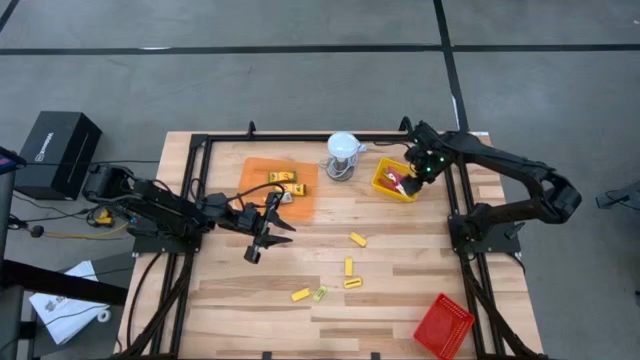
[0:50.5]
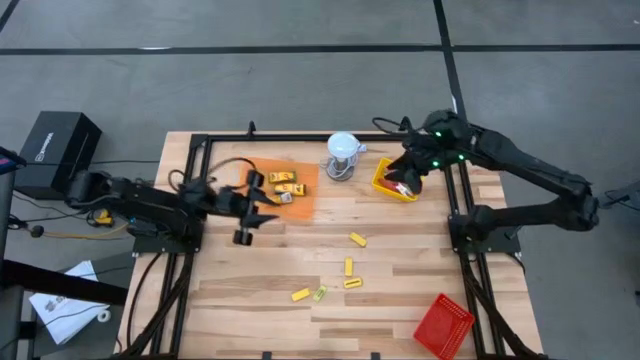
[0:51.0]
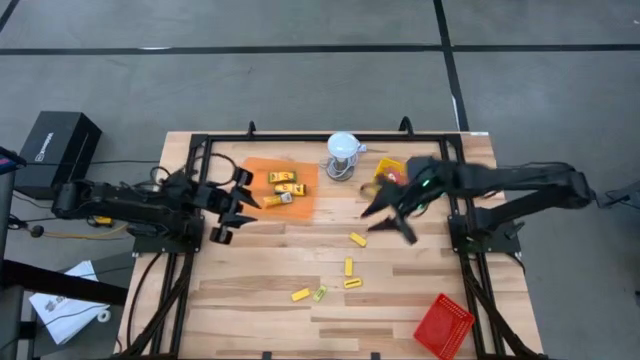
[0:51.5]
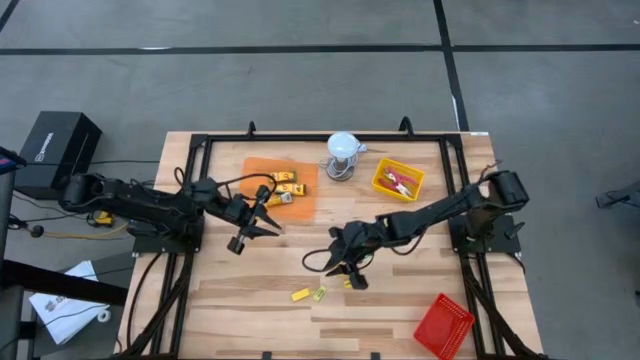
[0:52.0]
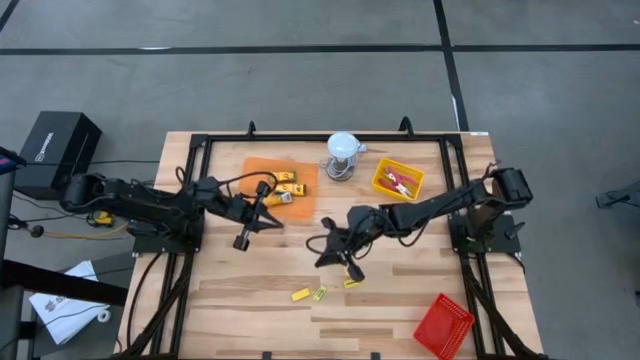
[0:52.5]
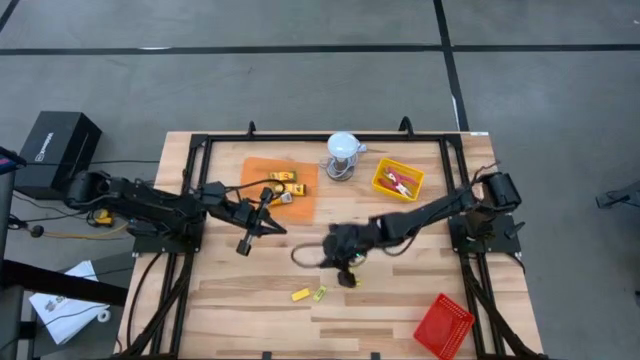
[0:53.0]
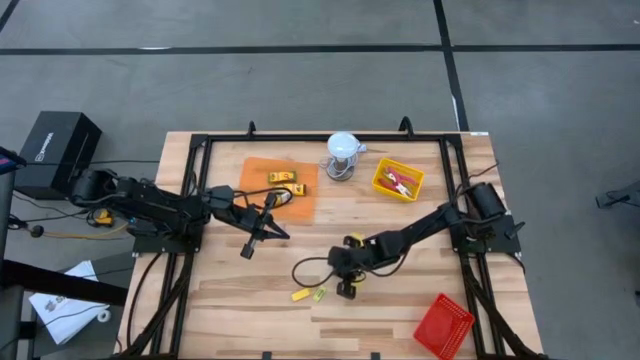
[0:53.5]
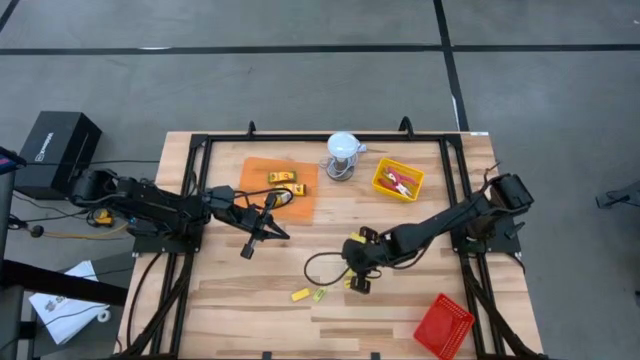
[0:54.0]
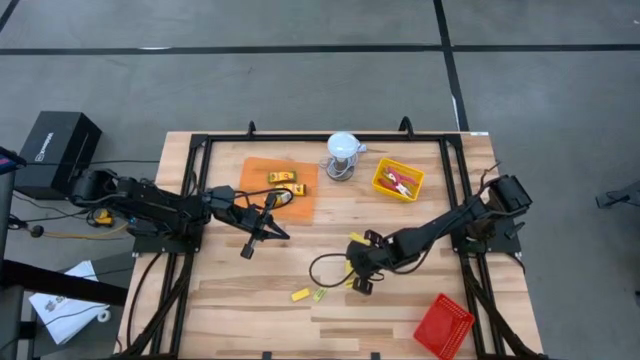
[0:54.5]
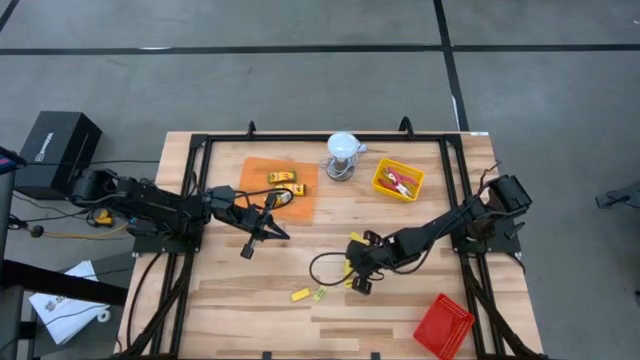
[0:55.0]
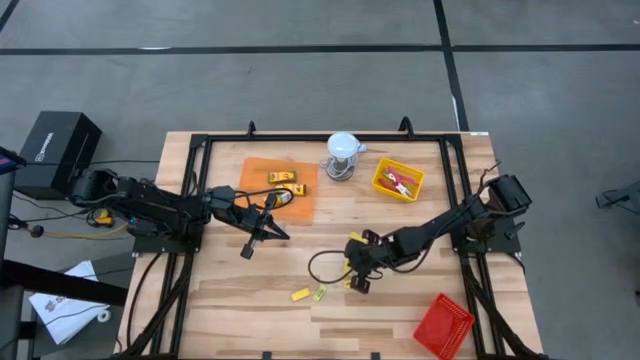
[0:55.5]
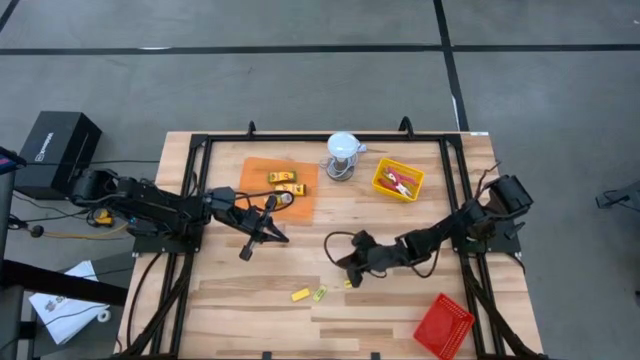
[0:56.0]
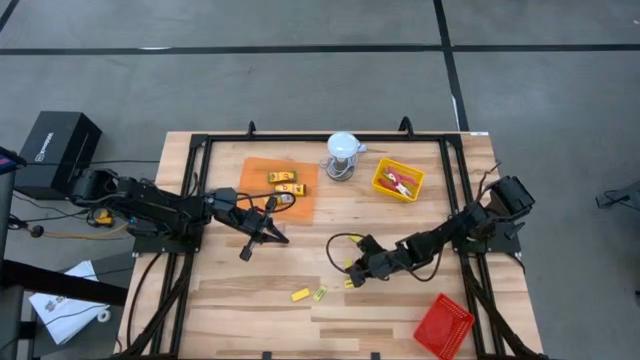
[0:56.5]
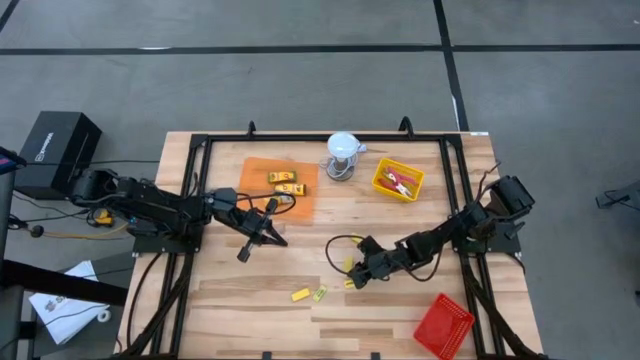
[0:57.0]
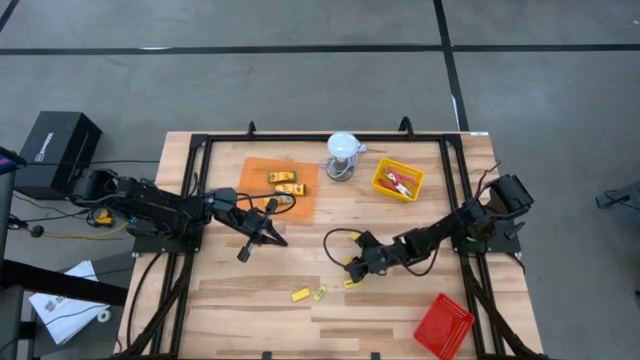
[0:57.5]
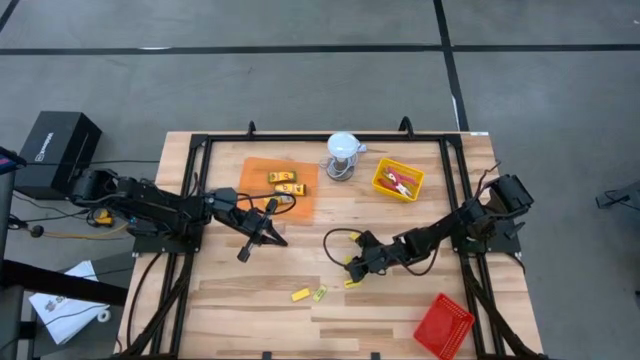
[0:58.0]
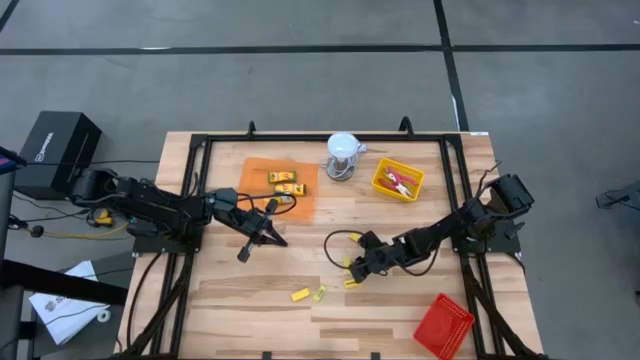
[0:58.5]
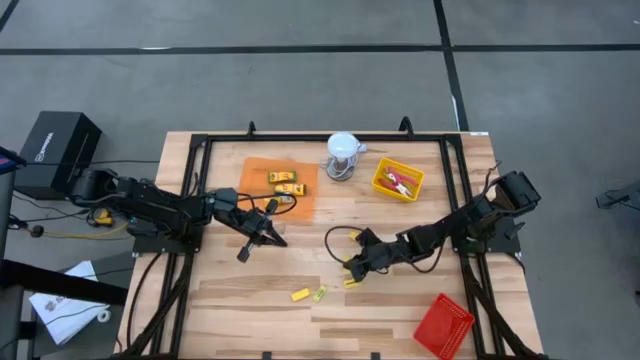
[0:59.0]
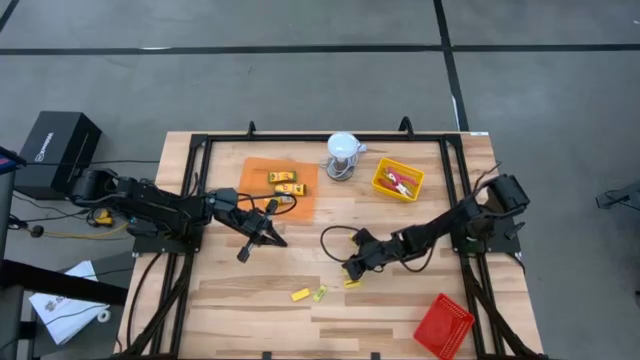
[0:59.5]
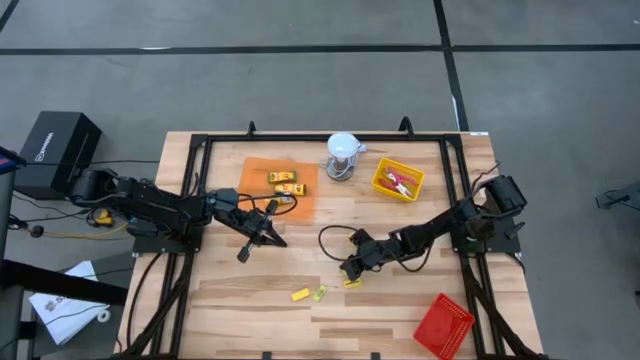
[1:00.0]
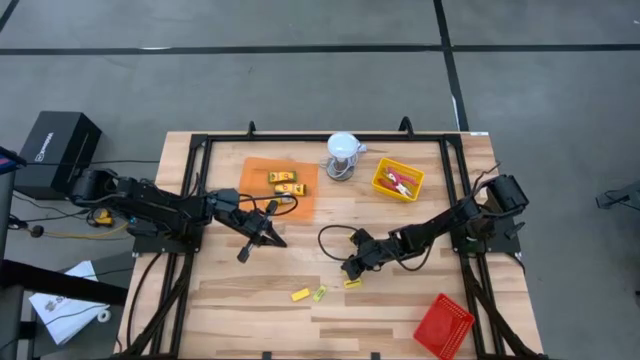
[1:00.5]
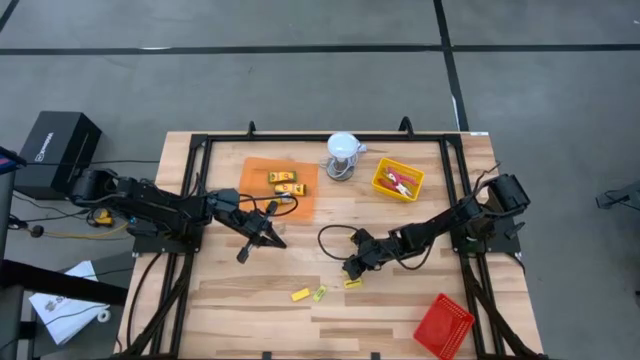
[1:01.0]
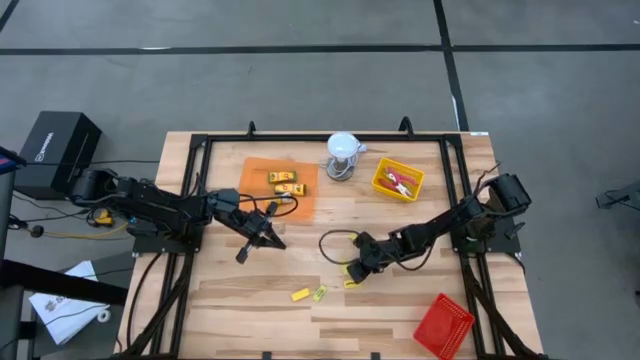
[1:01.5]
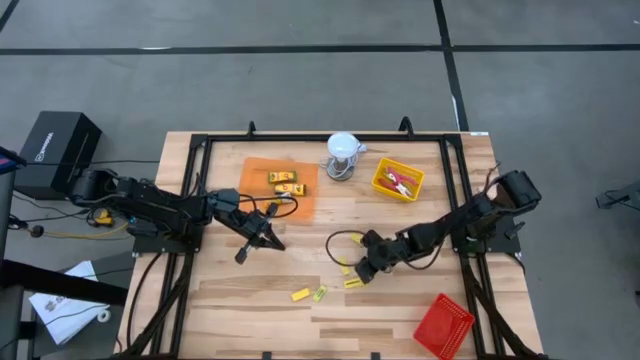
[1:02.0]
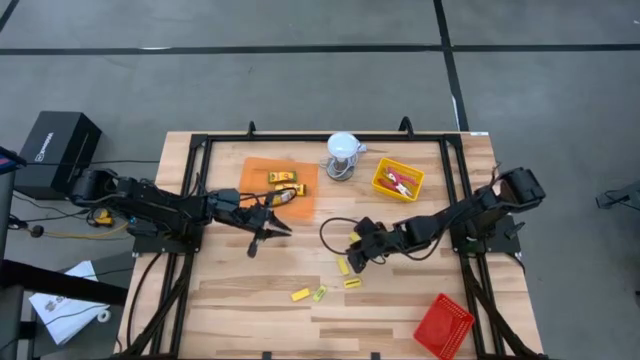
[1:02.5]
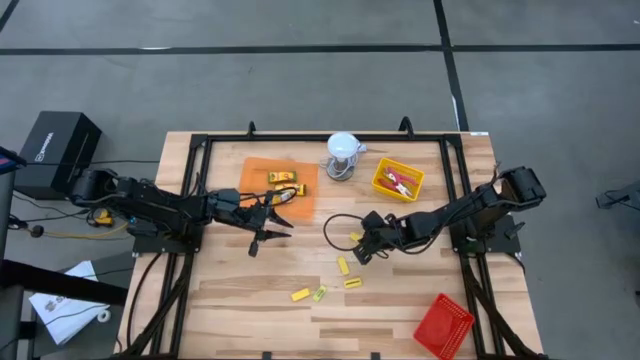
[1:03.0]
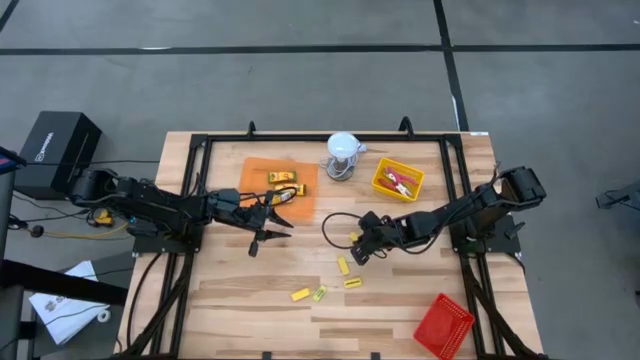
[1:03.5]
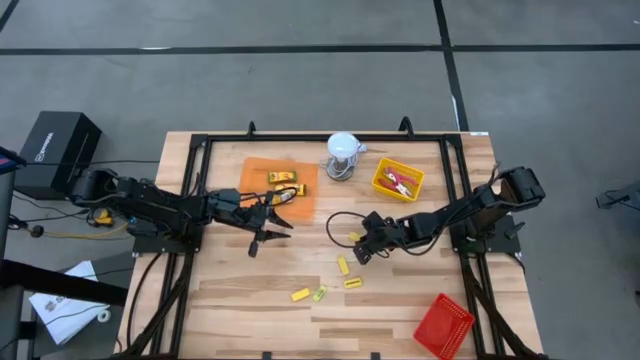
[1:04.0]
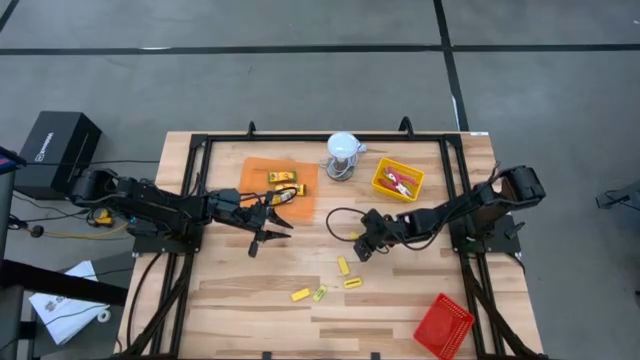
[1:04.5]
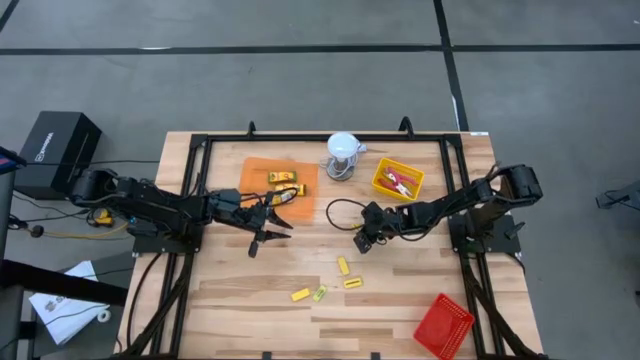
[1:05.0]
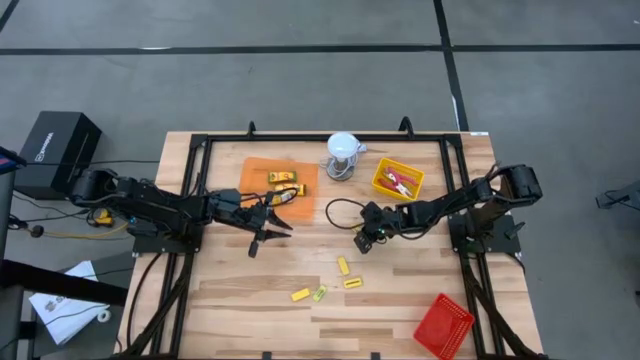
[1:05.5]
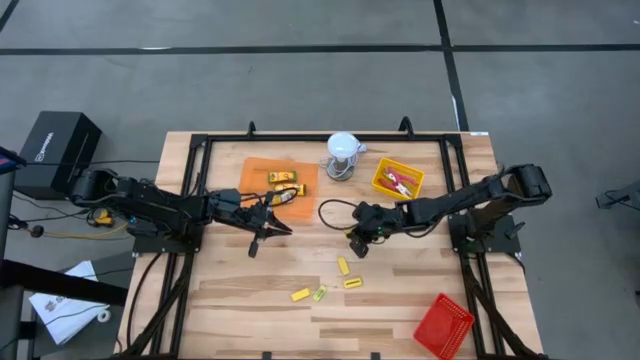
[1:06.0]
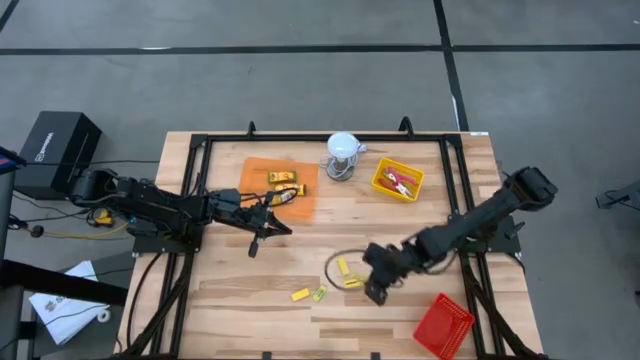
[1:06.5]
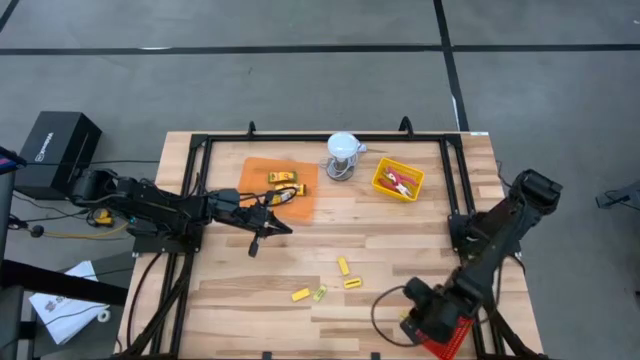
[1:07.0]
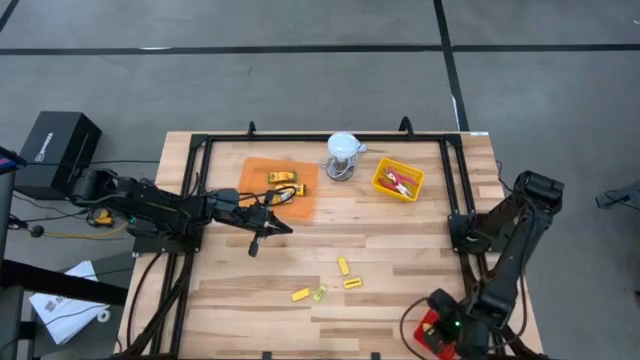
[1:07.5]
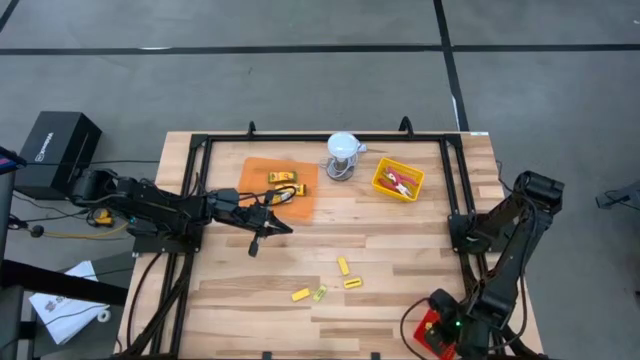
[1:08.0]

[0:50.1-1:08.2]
Task: Pick & Place School Supplies
Put the yellow eraser into the red bin

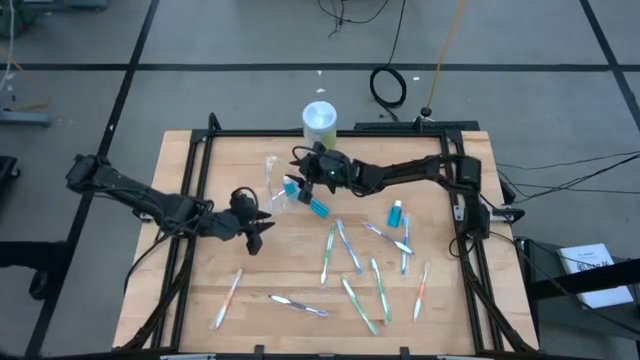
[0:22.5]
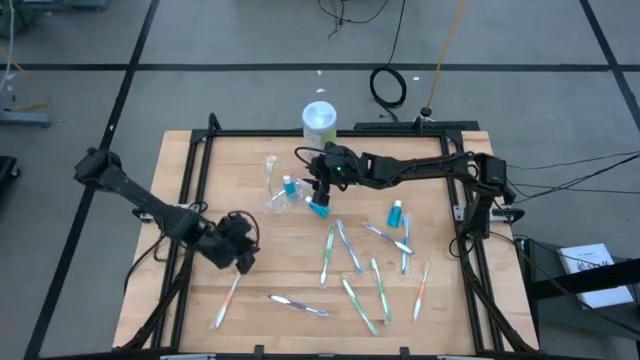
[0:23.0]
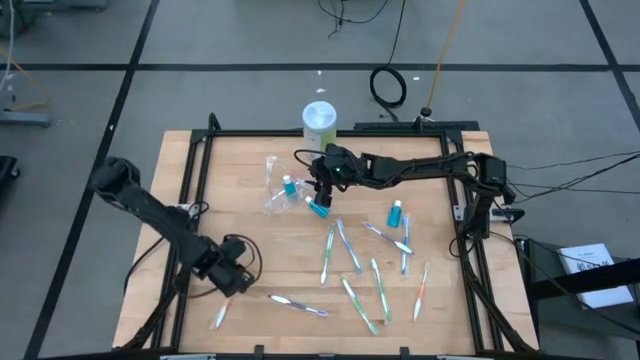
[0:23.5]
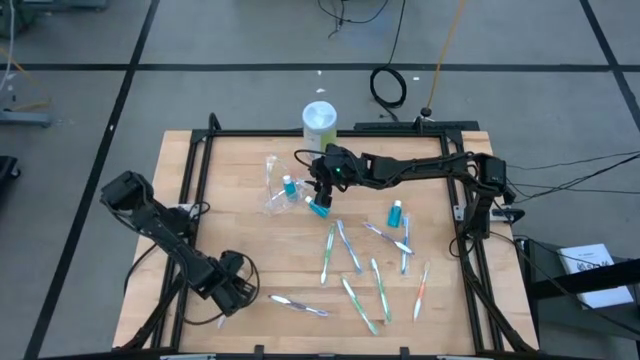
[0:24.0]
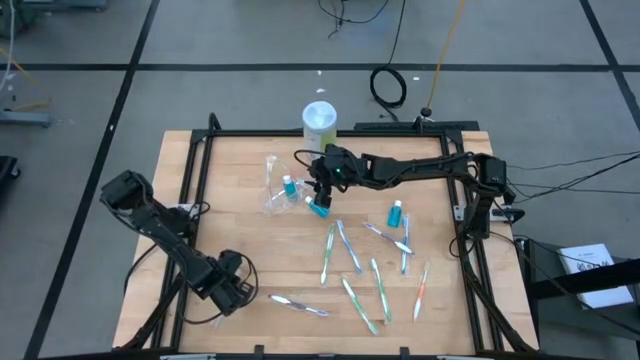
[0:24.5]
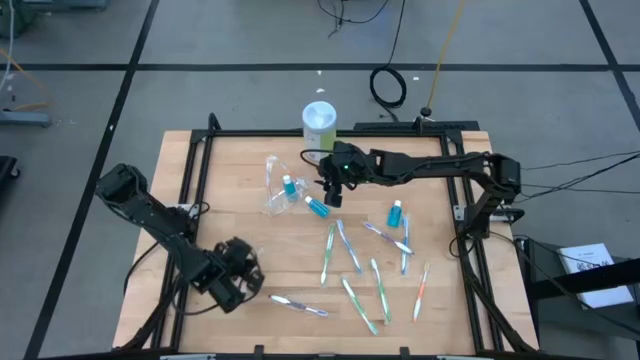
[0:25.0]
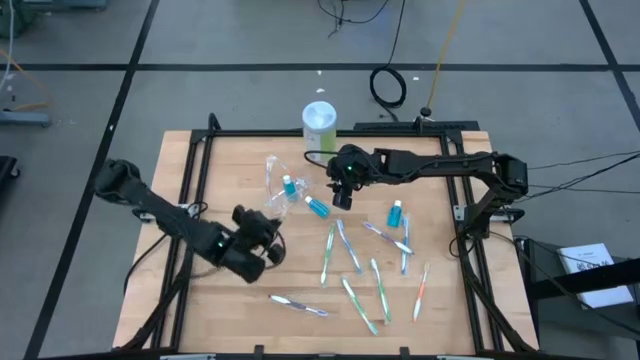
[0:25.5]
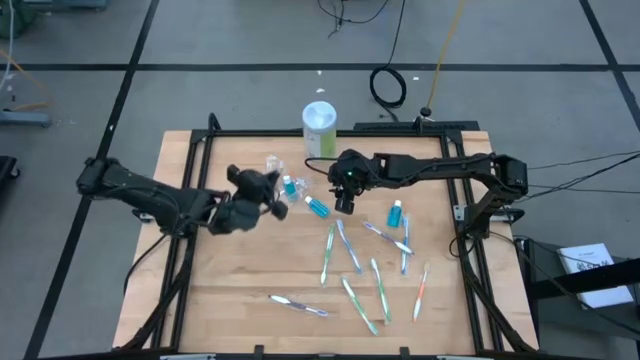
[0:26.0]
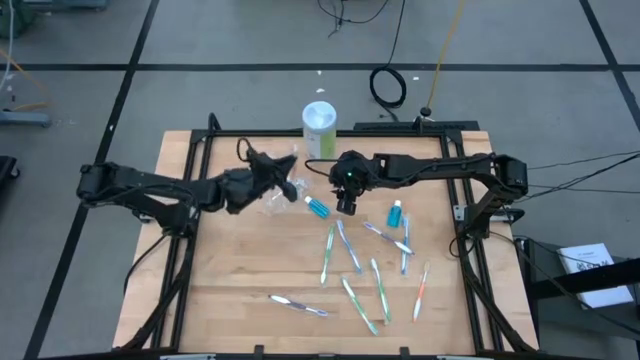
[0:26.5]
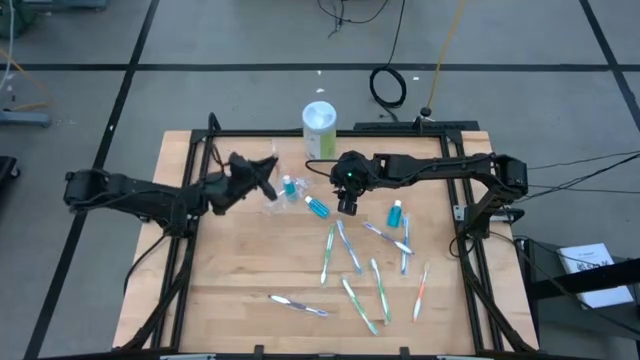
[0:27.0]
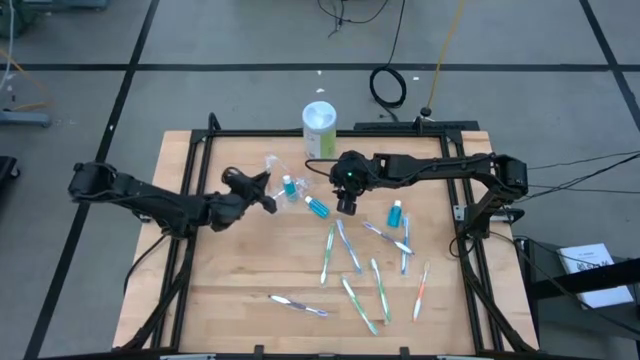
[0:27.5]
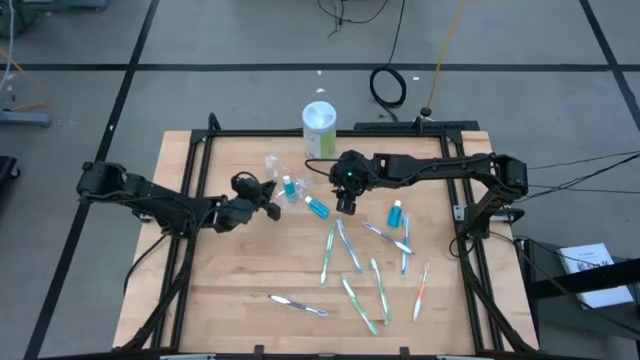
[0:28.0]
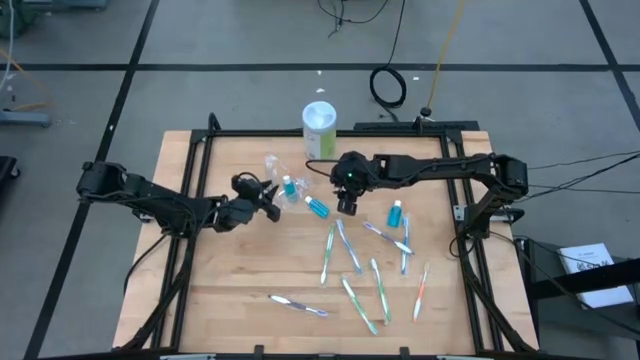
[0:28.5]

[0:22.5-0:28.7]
Task: Pick & Place toothbrushing station
Put the orange toothbrush into the transparent organizer
